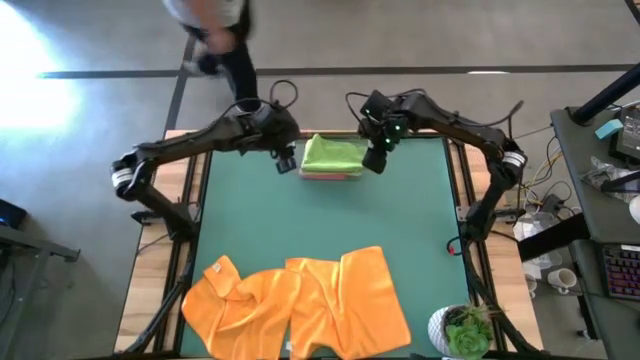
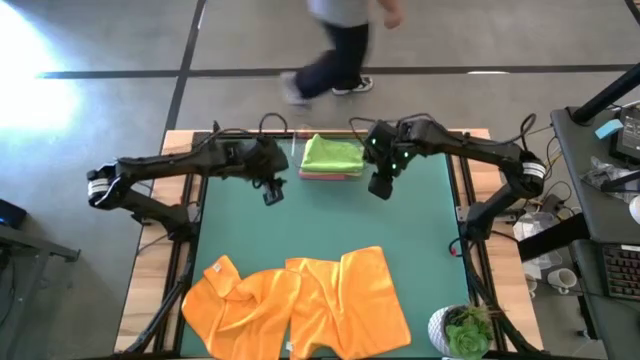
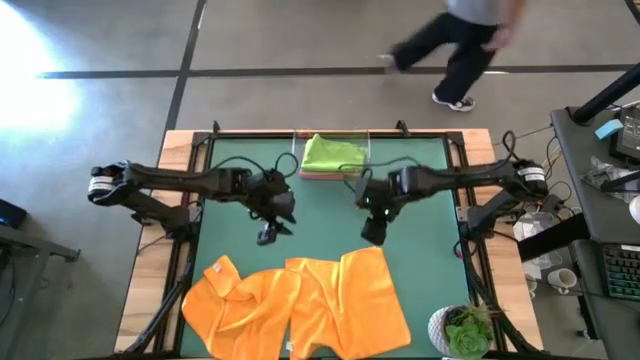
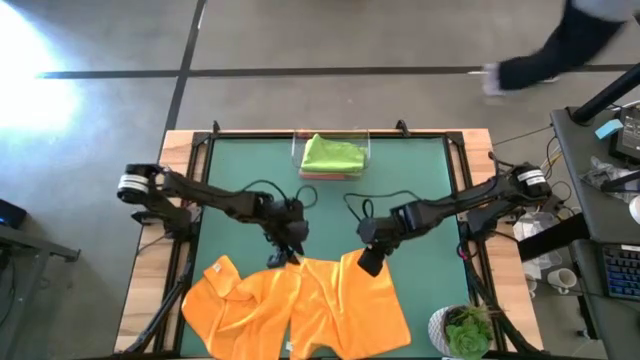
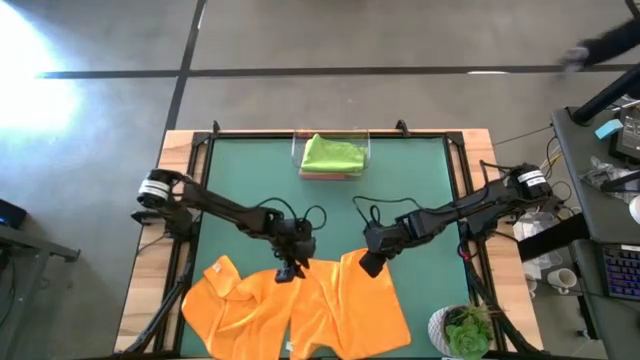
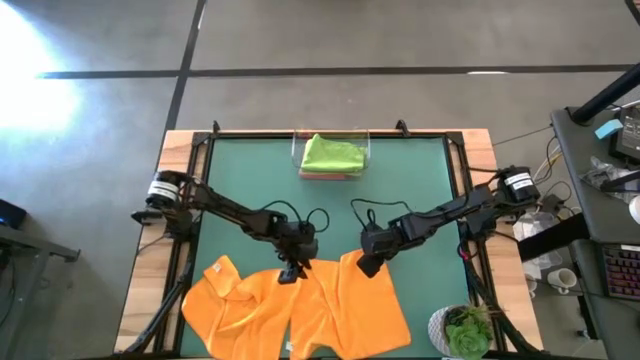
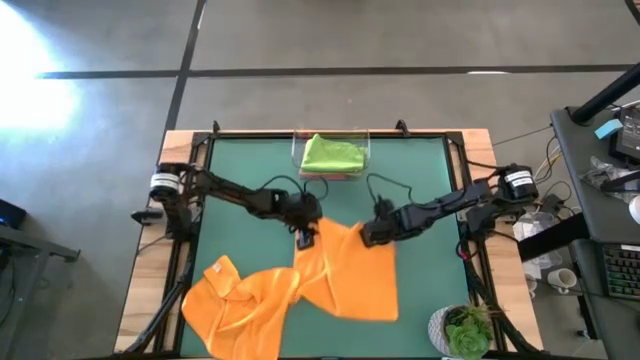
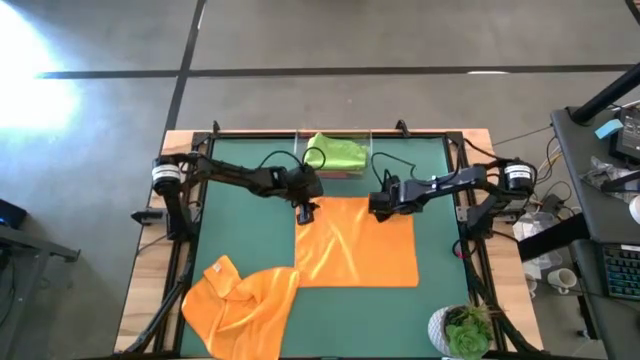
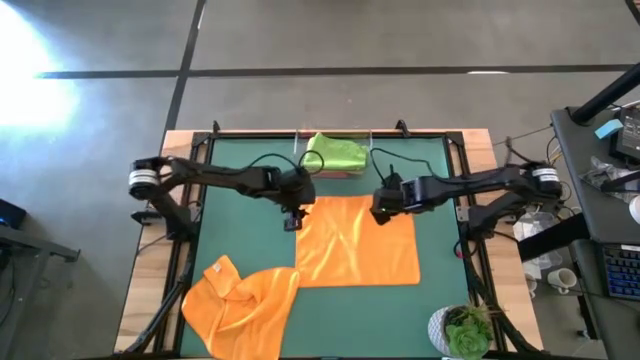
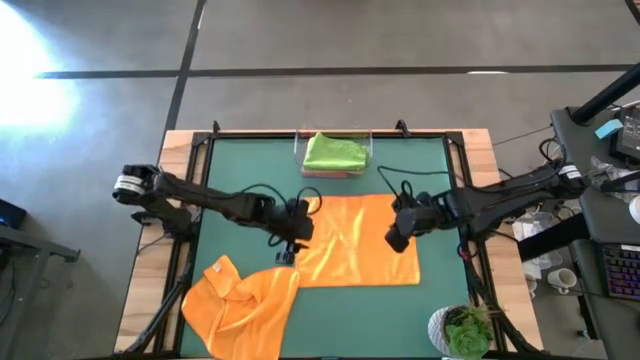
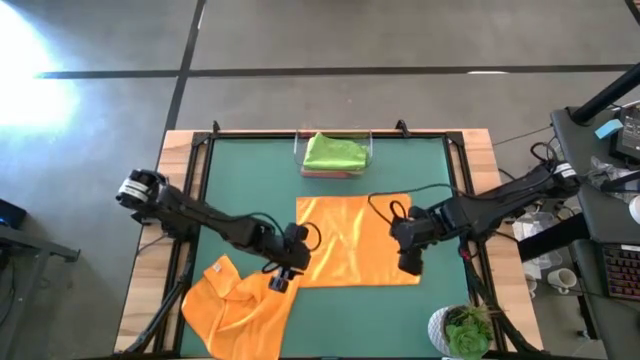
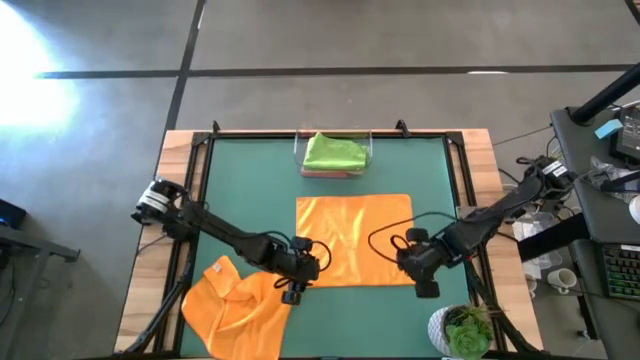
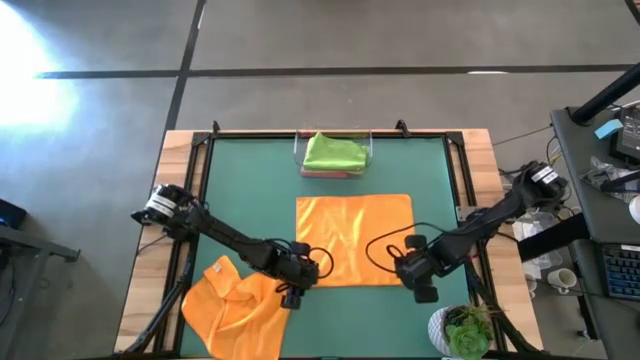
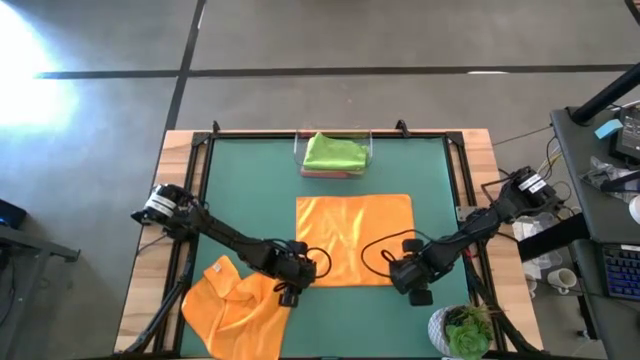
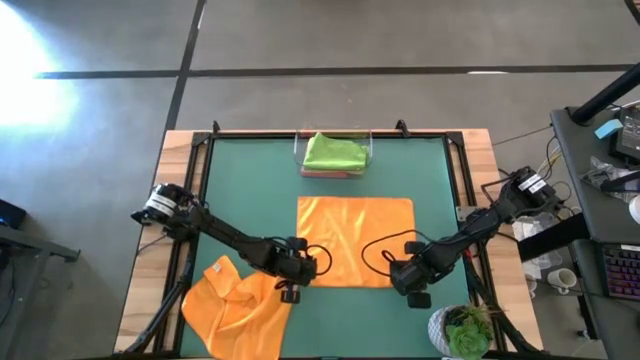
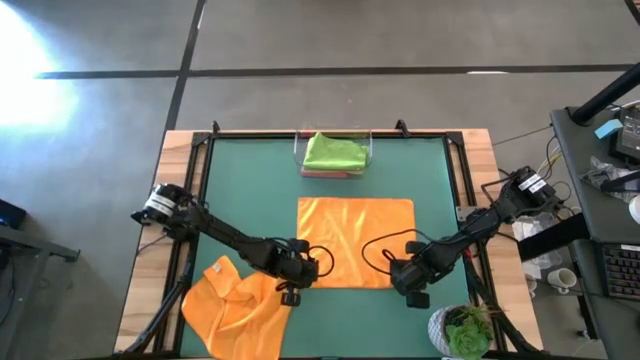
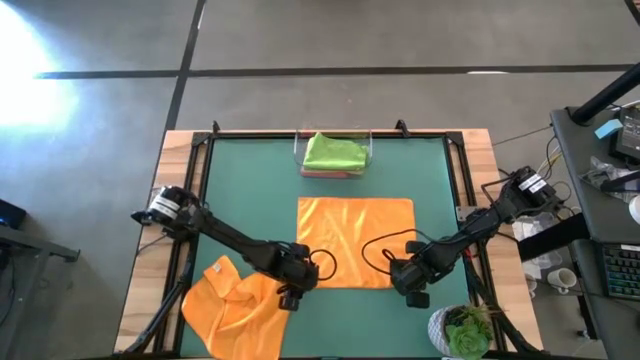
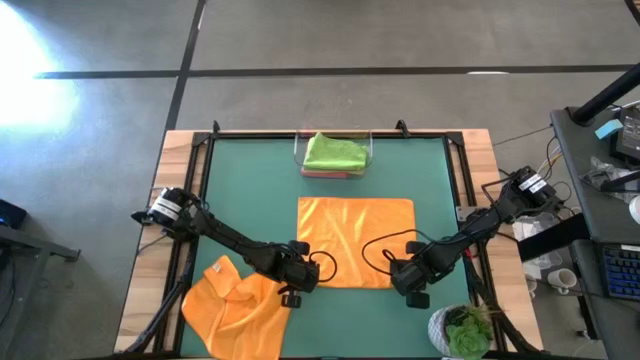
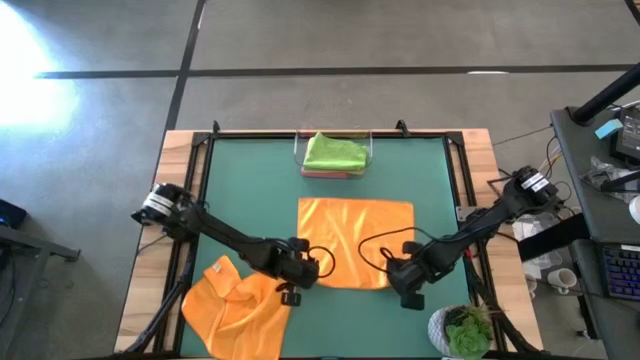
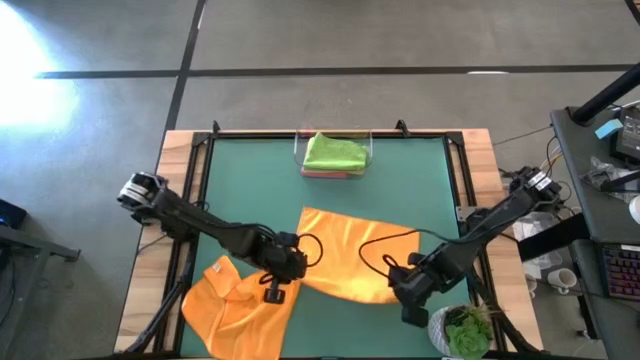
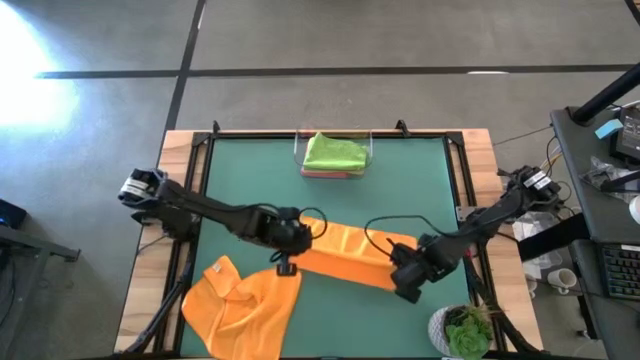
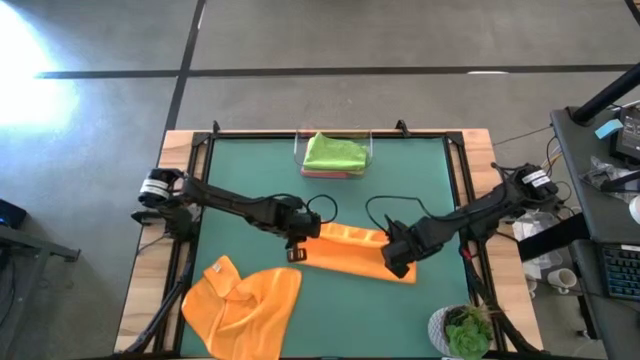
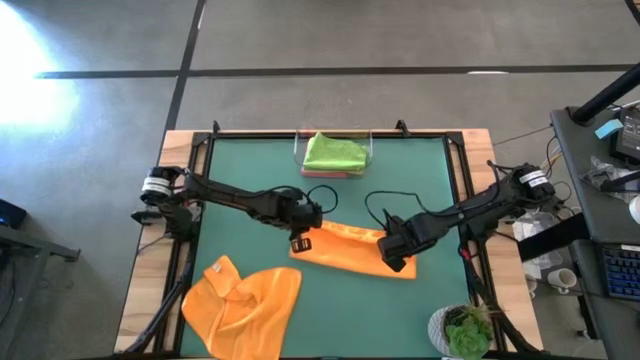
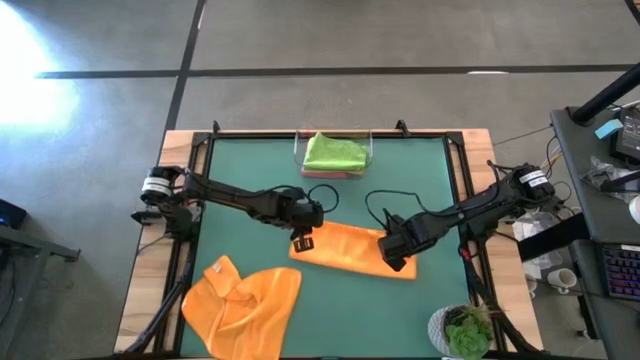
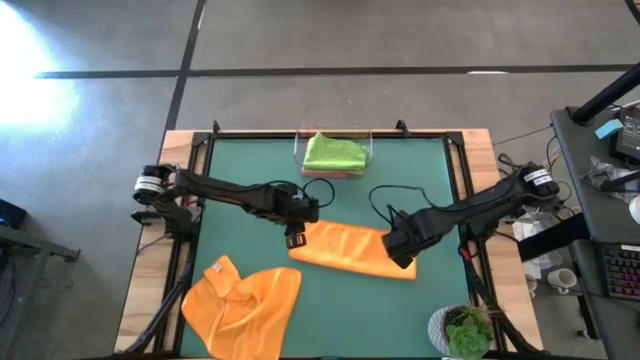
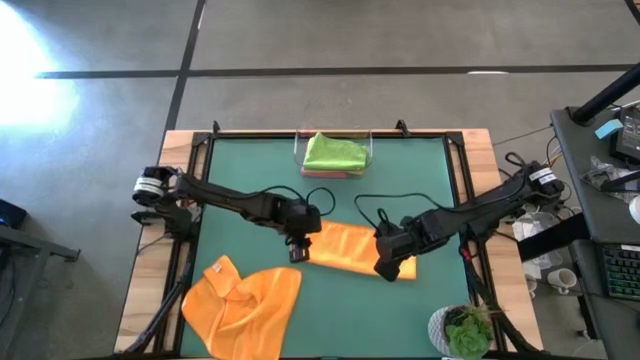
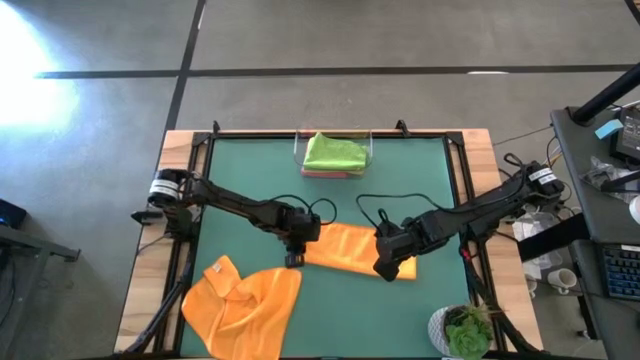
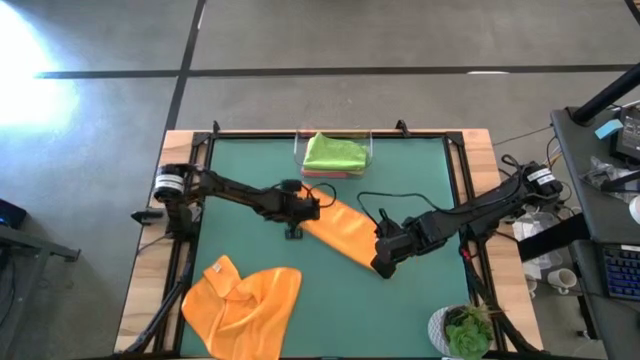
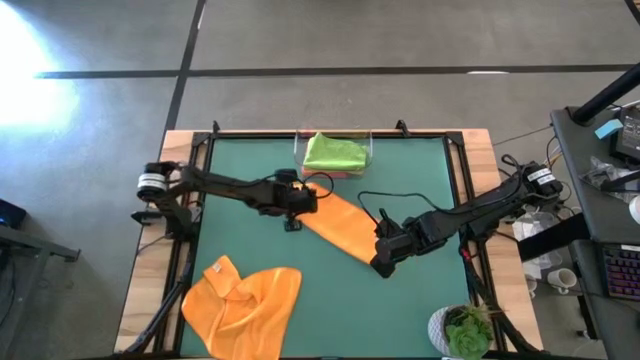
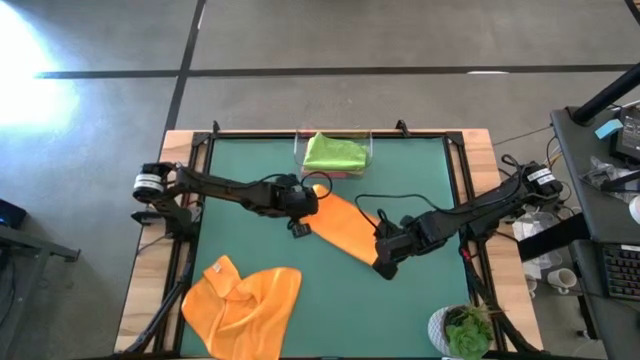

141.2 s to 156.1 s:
Task: Fold microfiber towels
Fold the right orange microfiber towel

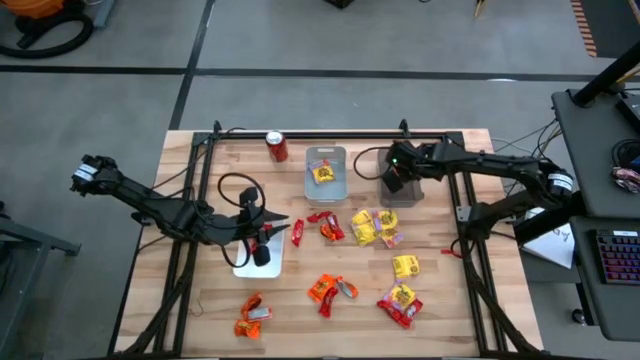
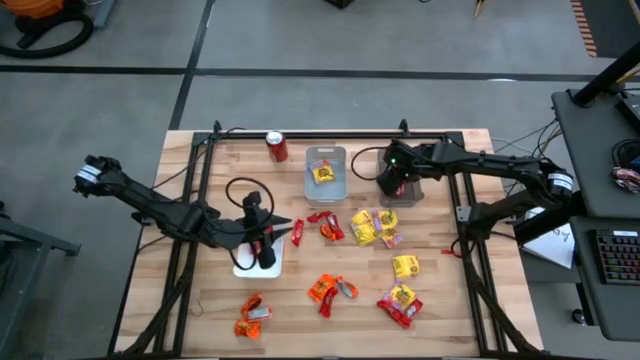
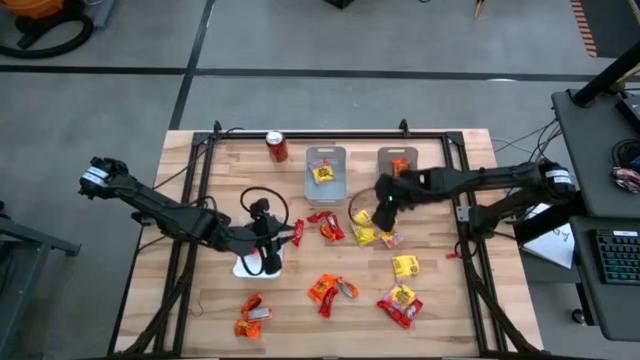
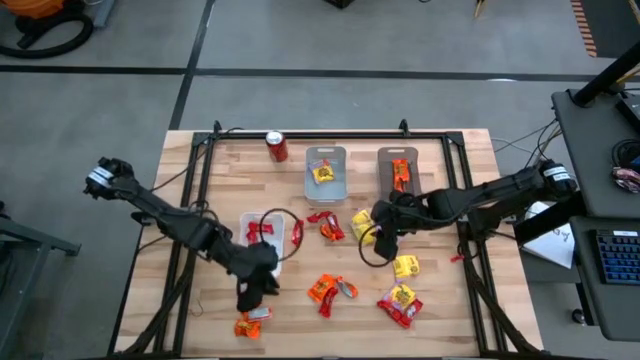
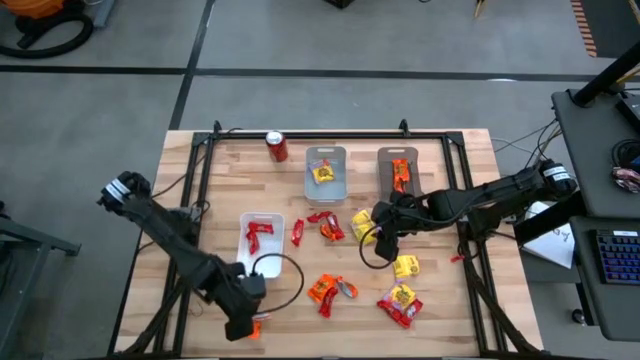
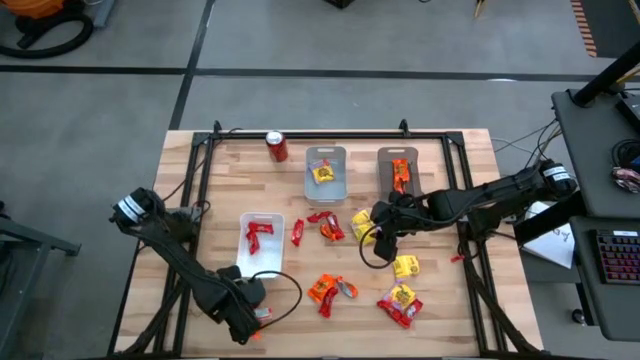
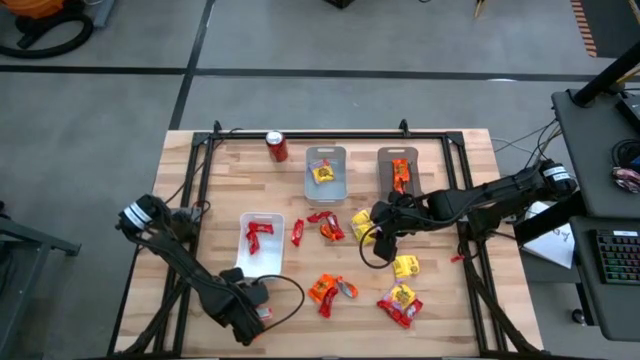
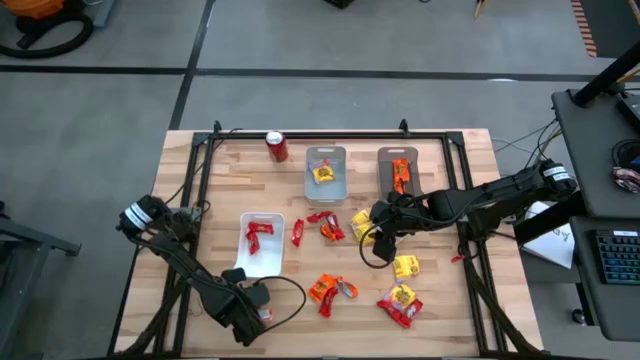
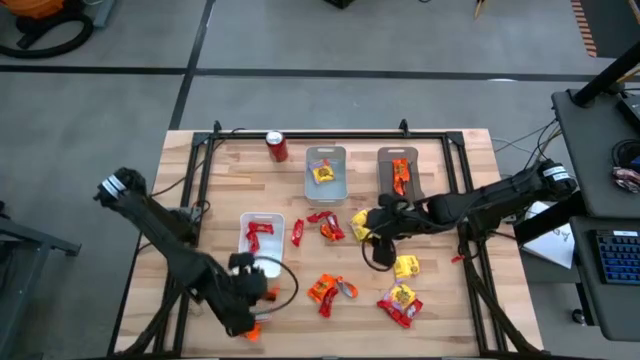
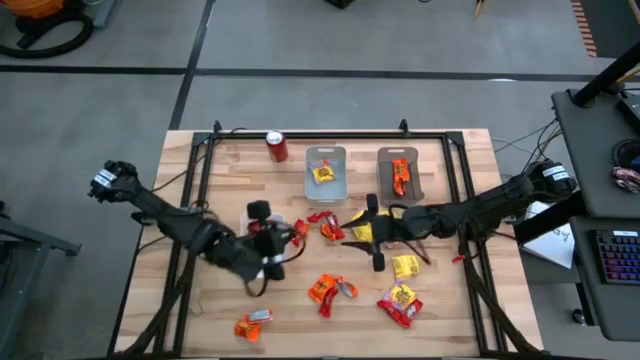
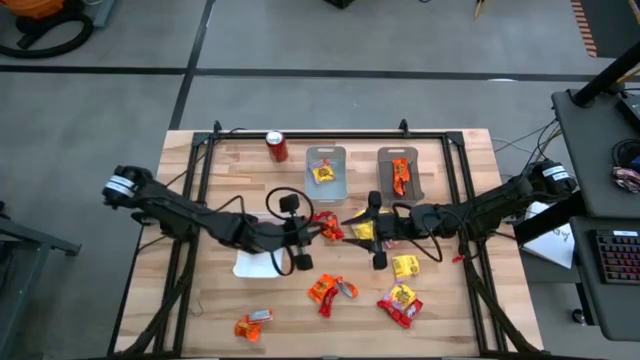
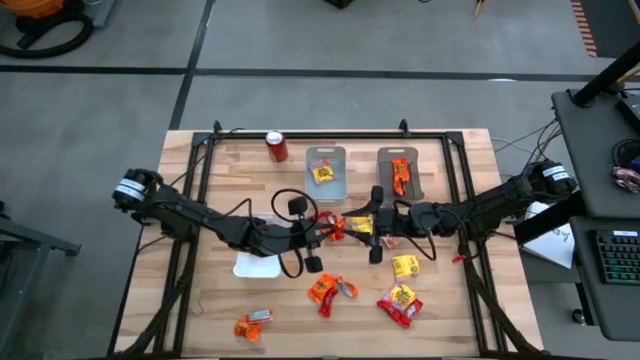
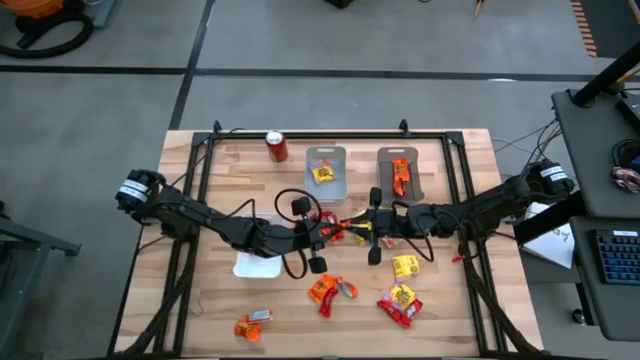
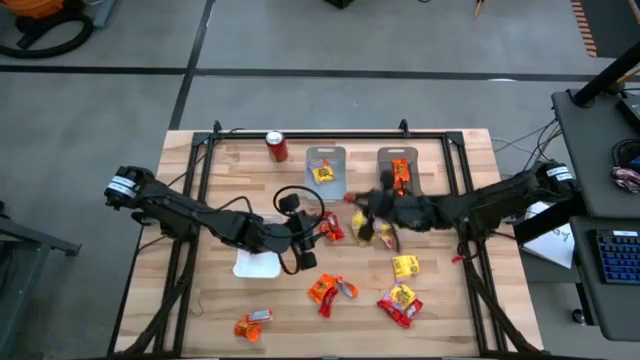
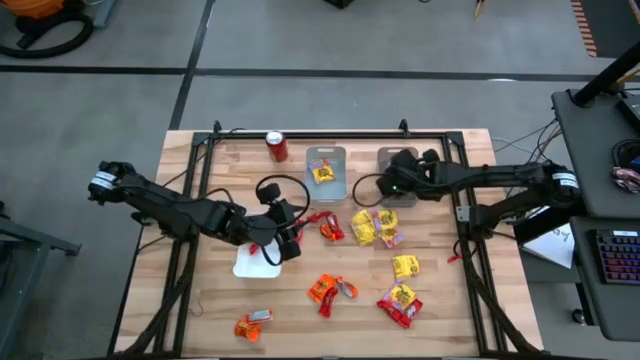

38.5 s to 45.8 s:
Task: Sort candy
Put the orange candy into the black bin
